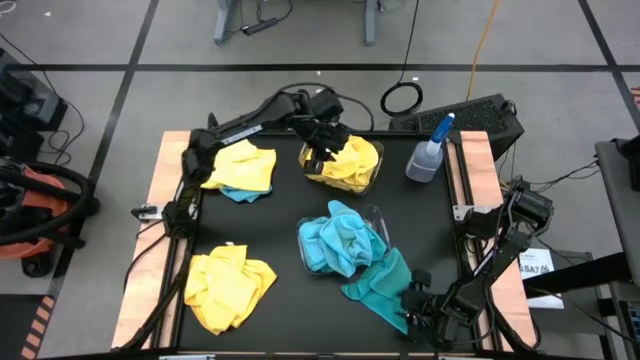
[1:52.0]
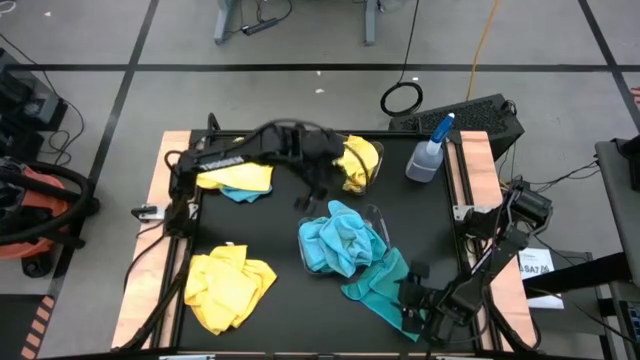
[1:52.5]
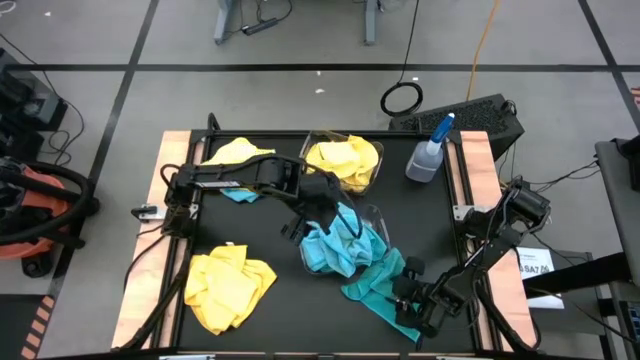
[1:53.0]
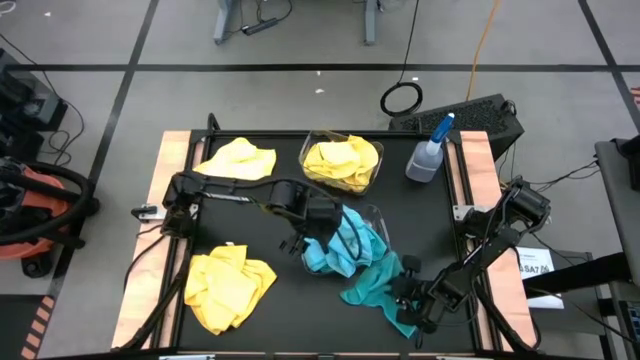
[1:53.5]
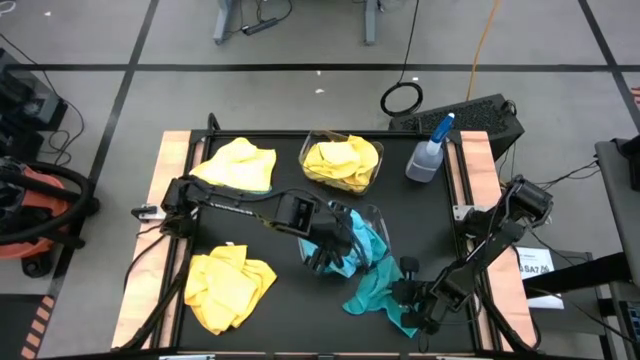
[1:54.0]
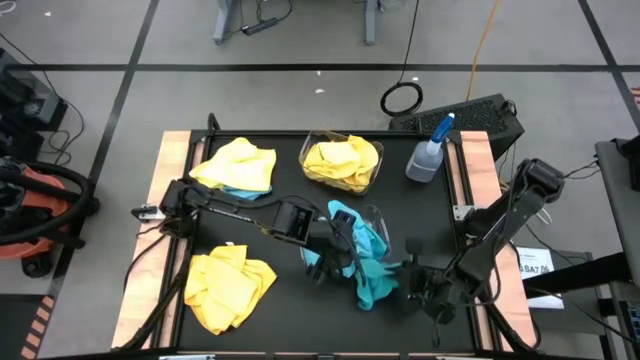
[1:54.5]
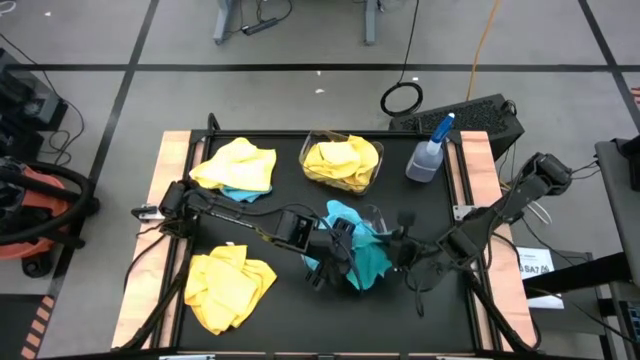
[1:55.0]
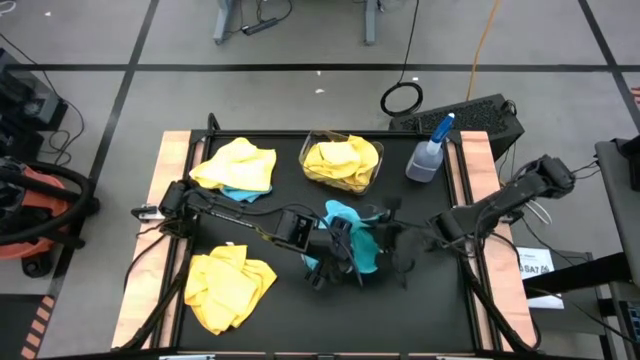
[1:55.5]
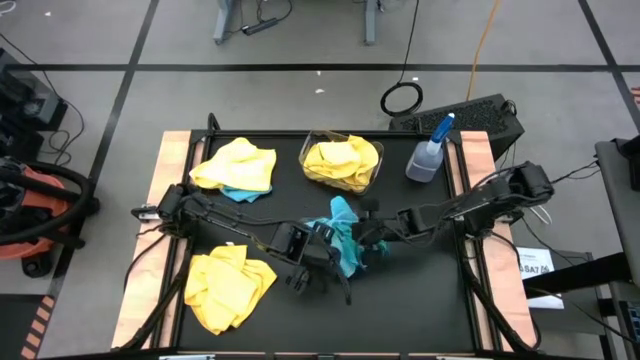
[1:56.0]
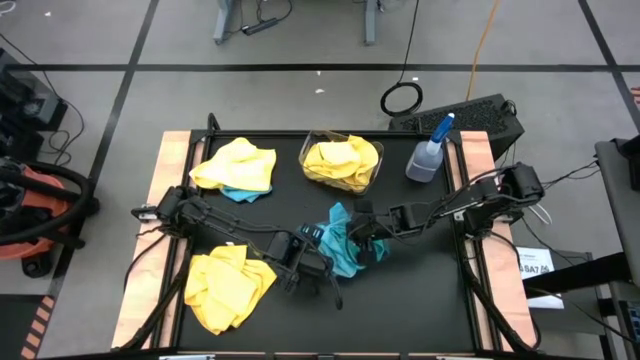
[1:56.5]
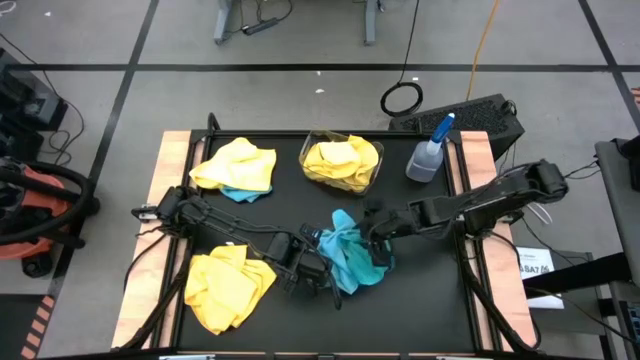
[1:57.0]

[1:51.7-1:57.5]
Task: Sort microfiber towel by color & place in baskets
Put the blue microfiber cloth into the bottom transparent bin

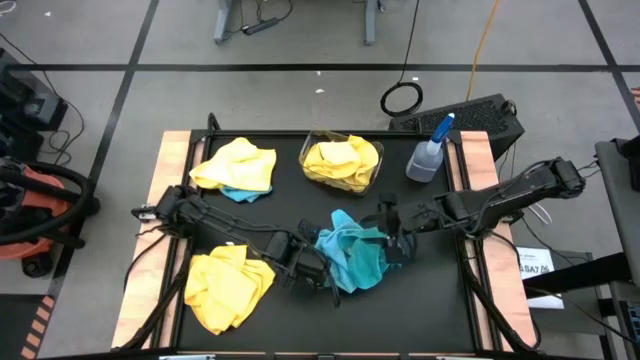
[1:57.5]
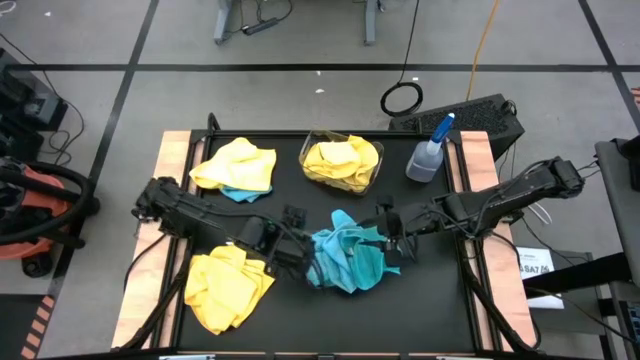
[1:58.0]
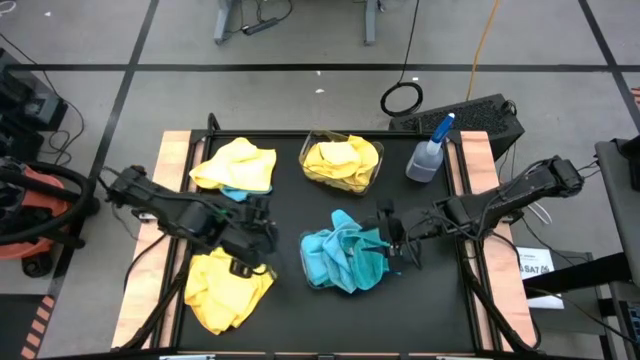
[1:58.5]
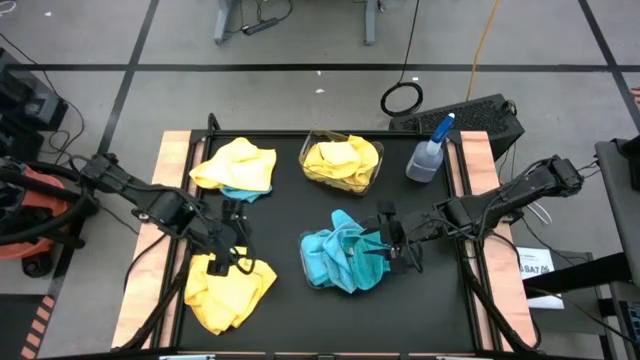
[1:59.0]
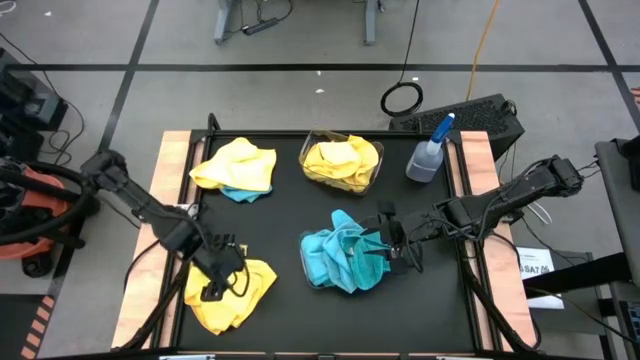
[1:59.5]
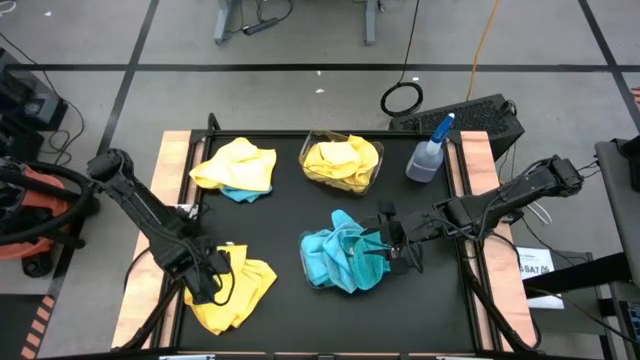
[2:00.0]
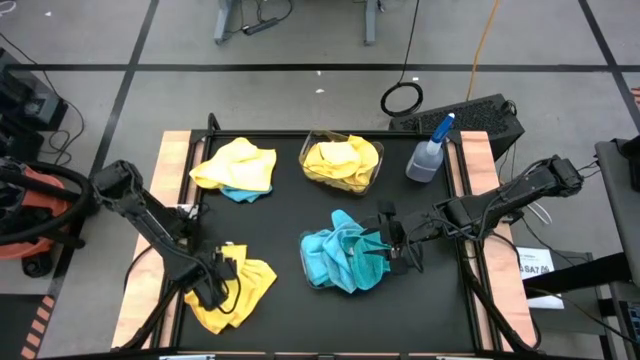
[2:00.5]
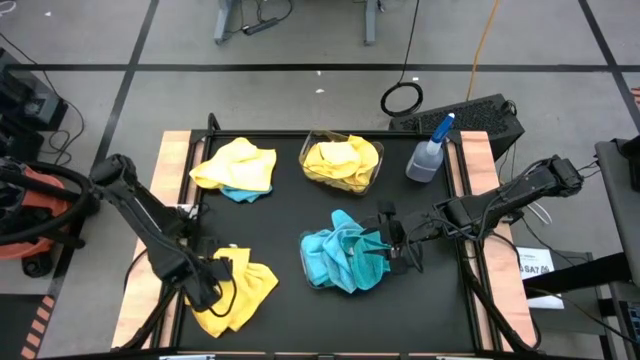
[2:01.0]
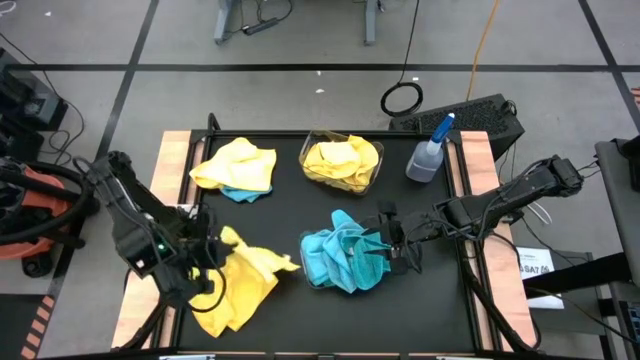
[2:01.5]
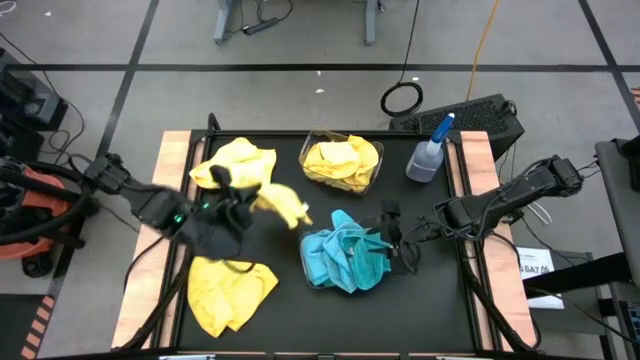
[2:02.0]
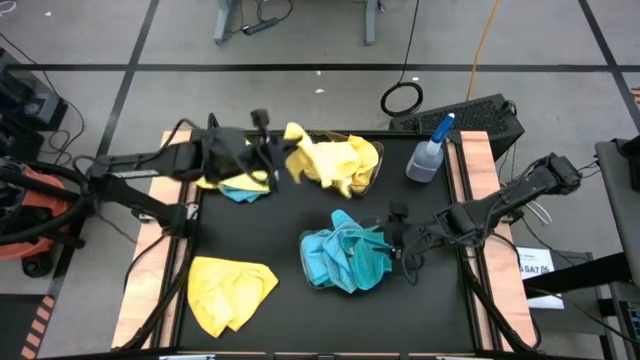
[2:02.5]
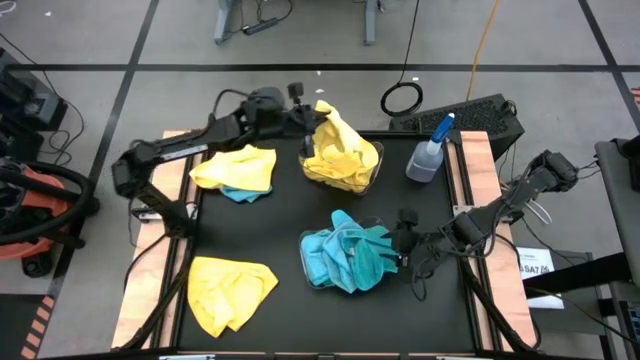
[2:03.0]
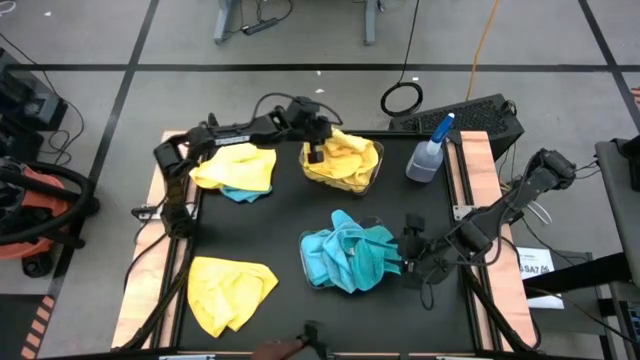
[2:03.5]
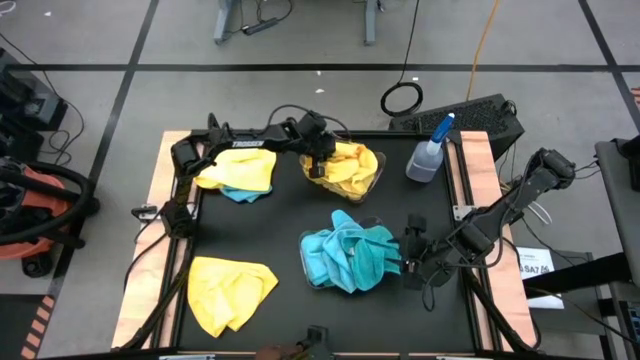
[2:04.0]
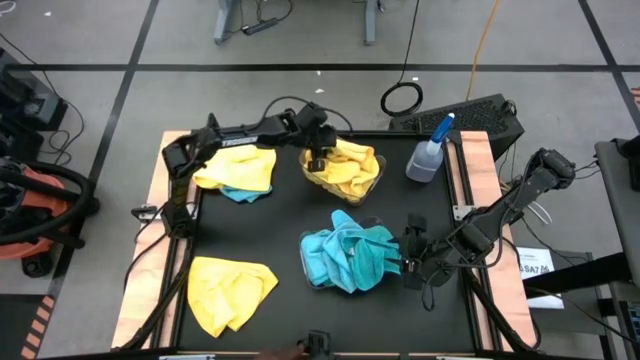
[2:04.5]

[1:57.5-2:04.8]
Put the yellow microfiber cloth into the top transparent bin

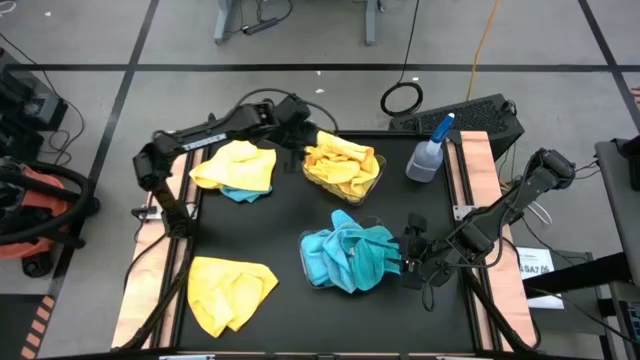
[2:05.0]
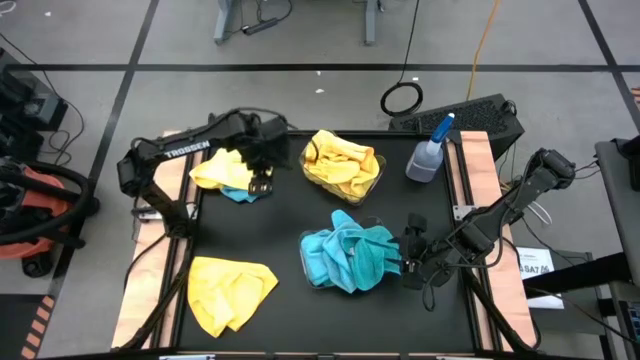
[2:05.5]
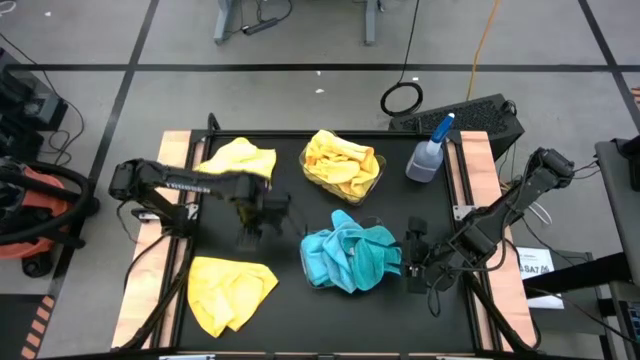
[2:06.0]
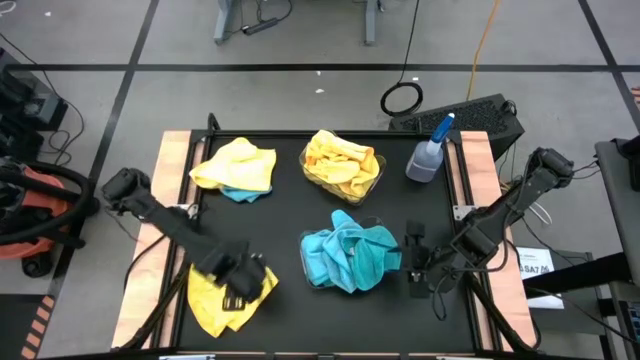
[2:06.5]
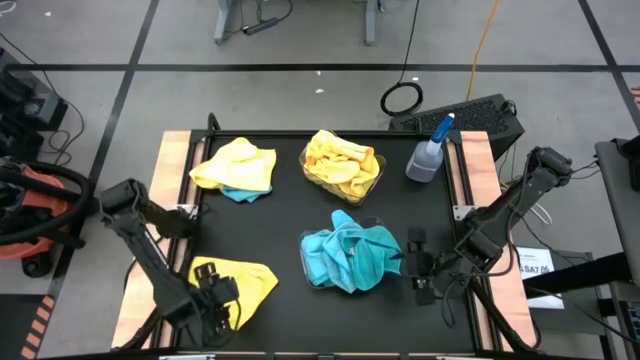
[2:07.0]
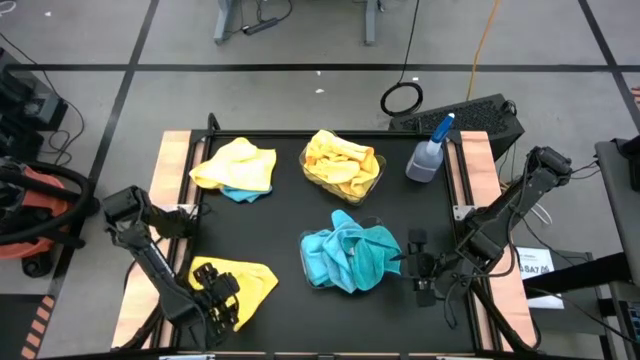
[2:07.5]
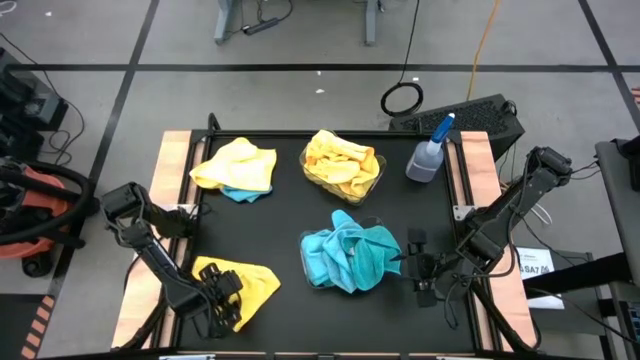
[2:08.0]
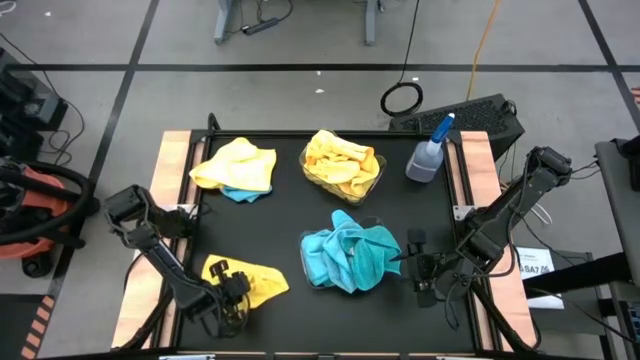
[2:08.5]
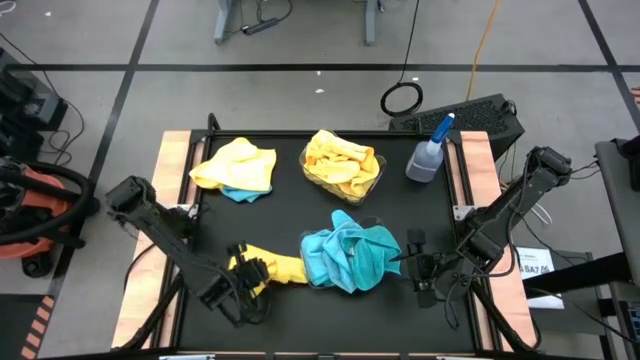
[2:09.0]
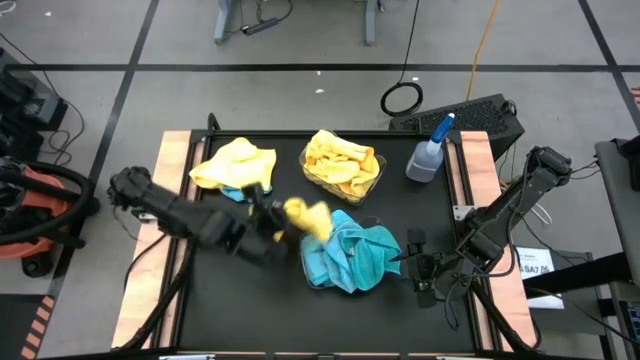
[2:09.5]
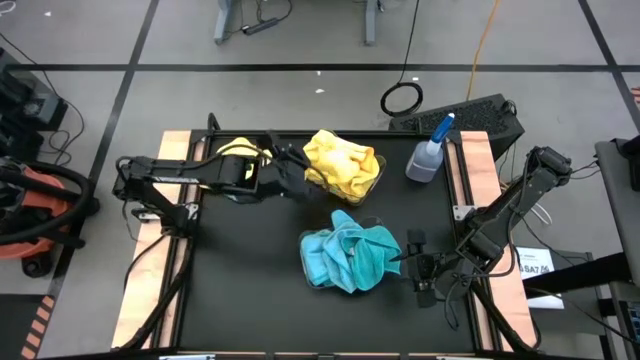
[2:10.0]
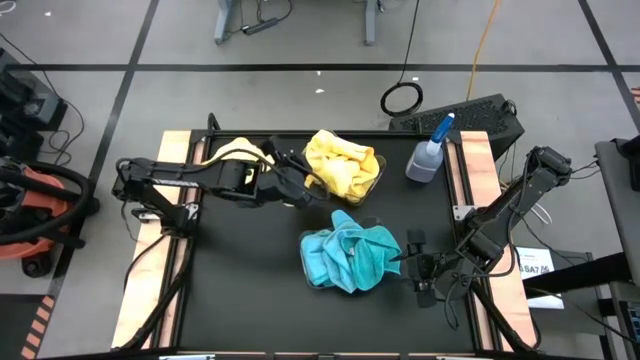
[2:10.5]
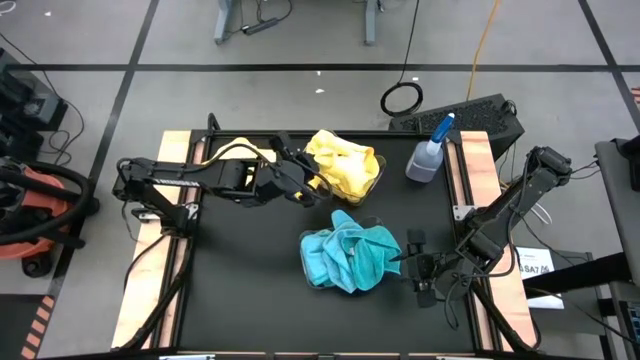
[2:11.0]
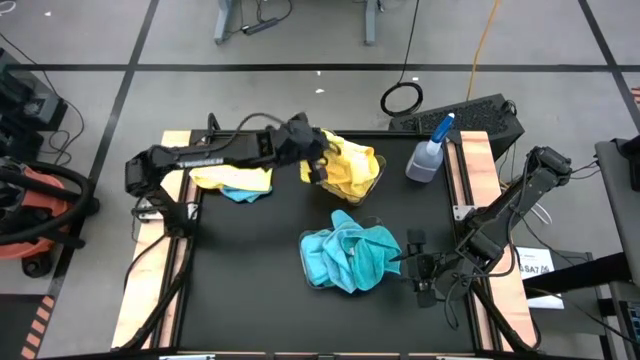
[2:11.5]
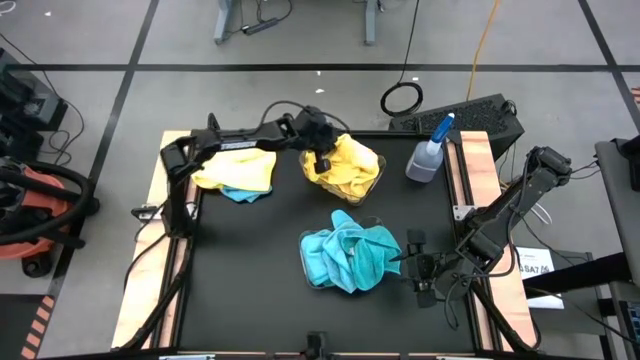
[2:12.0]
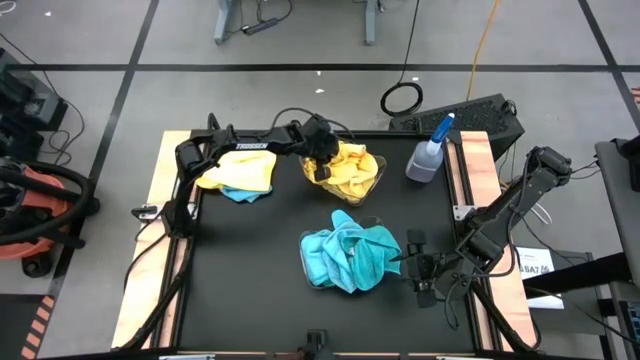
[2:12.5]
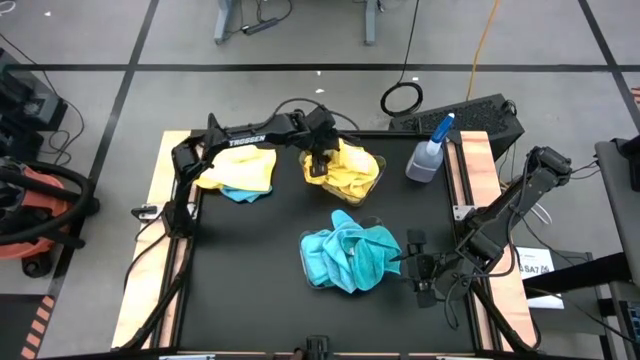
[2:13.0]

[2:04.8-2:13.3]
Put the yellow microfiber cloth into the top transparent bin

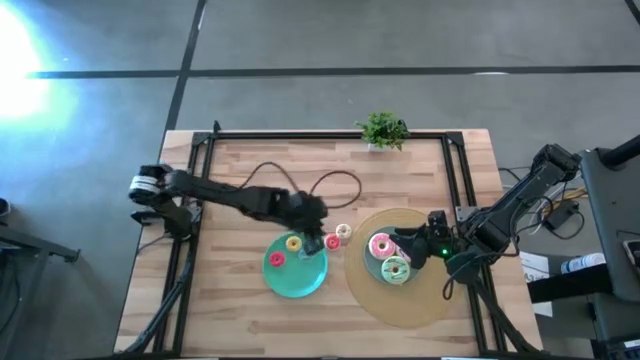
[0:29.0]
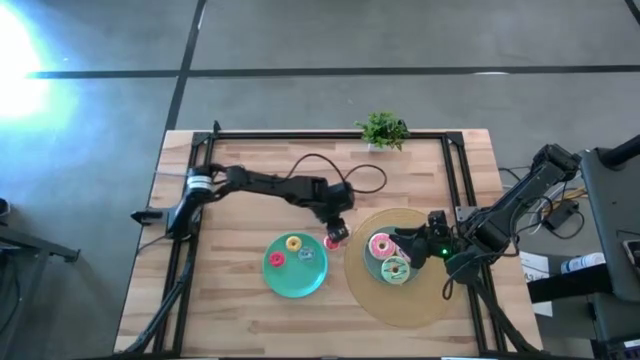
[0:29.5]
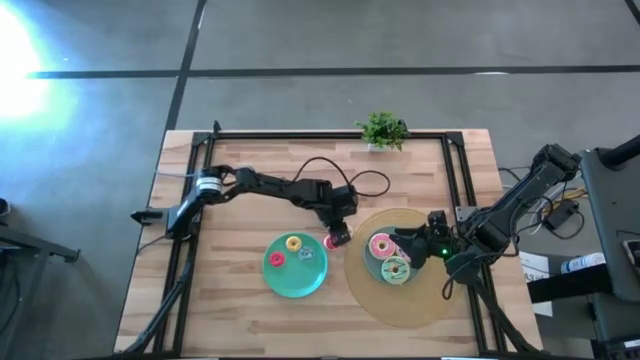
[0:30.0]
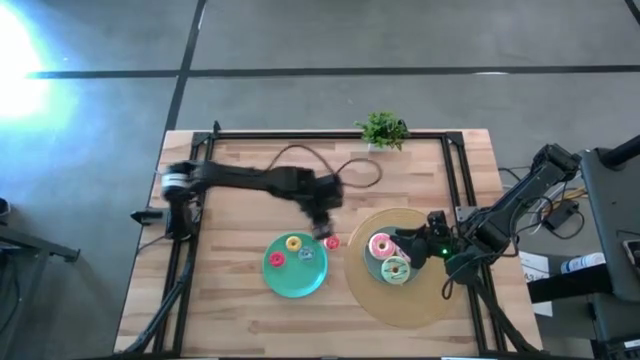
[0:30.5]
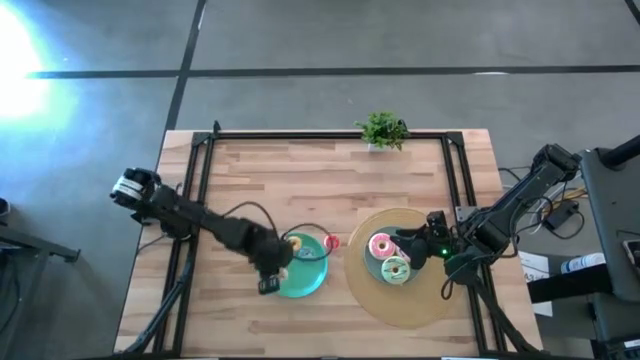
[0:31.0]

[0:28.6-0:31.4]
Task: Pick & Place donuts
Put the small white donut on the blue plate
